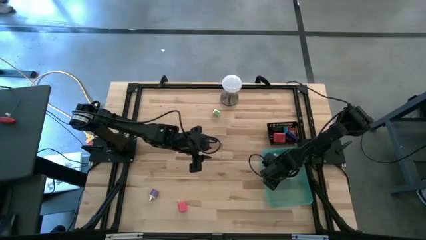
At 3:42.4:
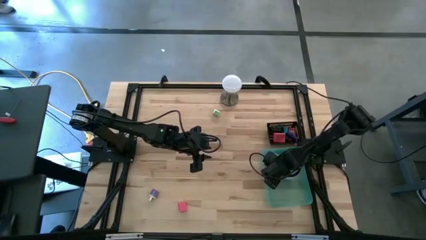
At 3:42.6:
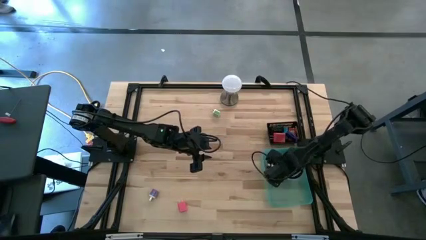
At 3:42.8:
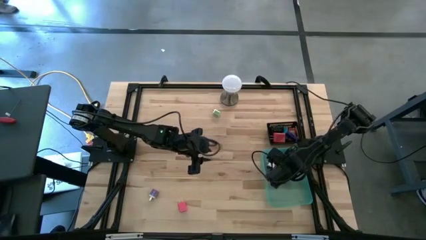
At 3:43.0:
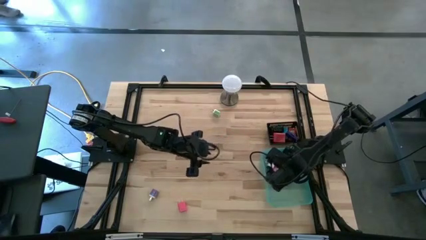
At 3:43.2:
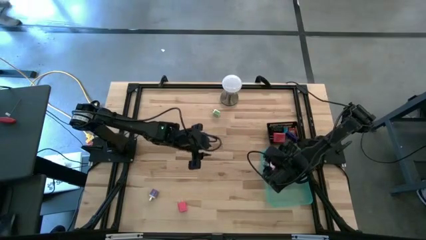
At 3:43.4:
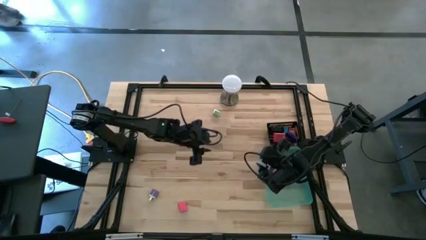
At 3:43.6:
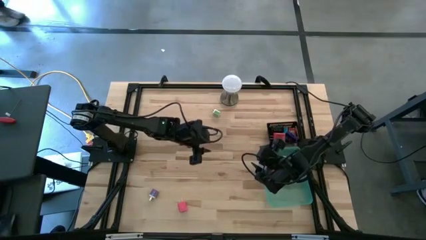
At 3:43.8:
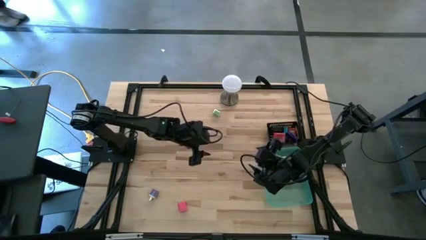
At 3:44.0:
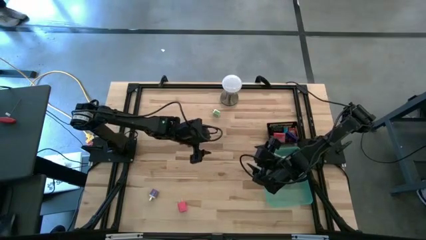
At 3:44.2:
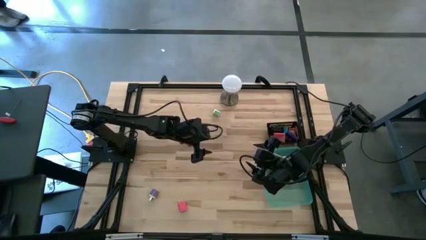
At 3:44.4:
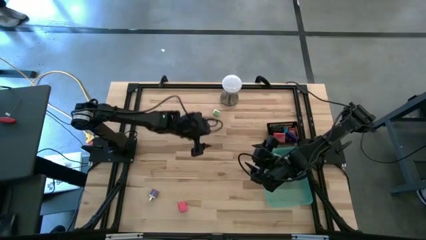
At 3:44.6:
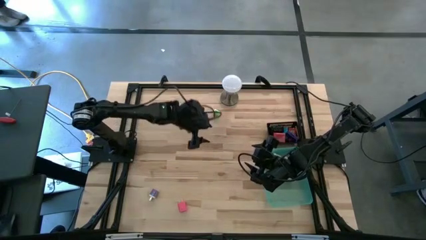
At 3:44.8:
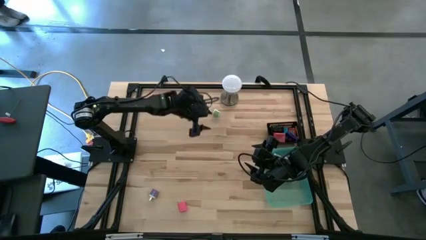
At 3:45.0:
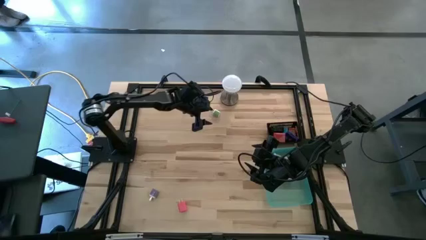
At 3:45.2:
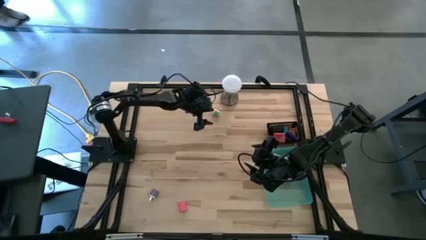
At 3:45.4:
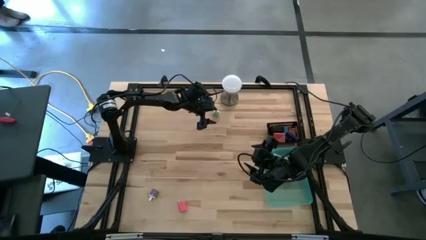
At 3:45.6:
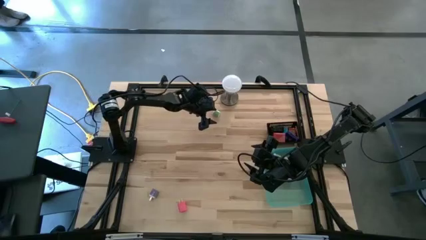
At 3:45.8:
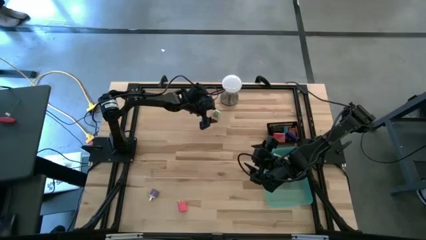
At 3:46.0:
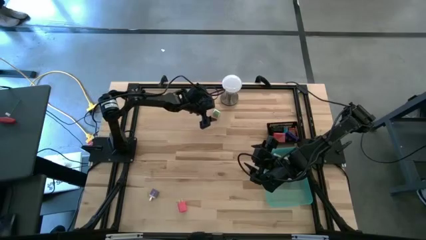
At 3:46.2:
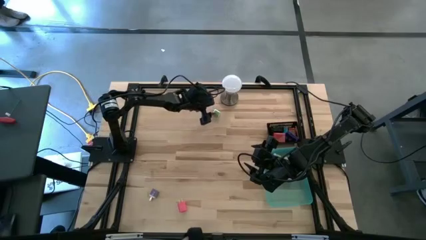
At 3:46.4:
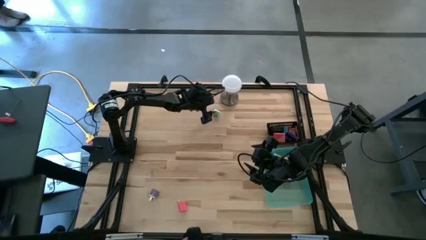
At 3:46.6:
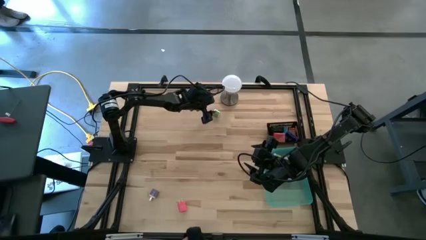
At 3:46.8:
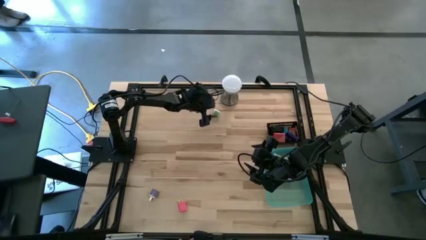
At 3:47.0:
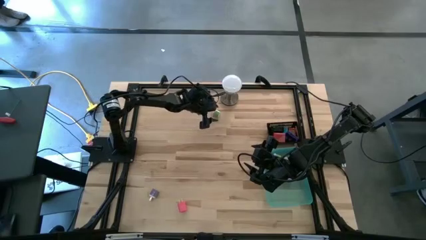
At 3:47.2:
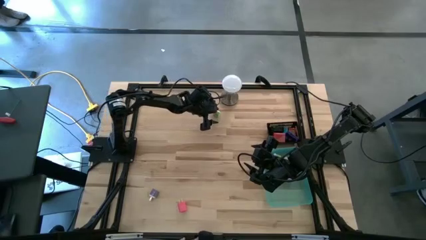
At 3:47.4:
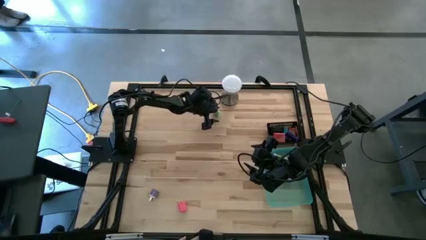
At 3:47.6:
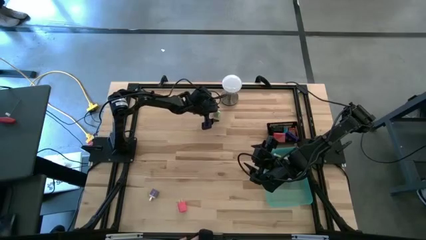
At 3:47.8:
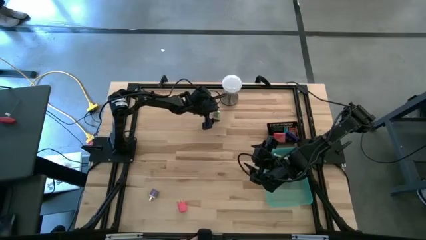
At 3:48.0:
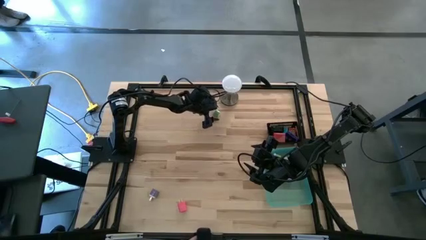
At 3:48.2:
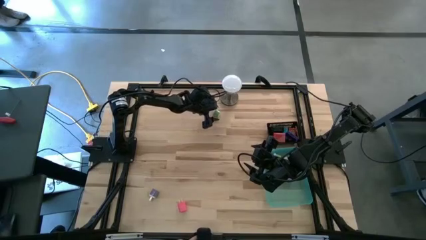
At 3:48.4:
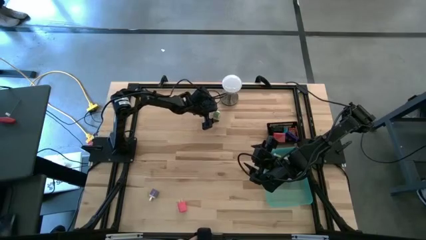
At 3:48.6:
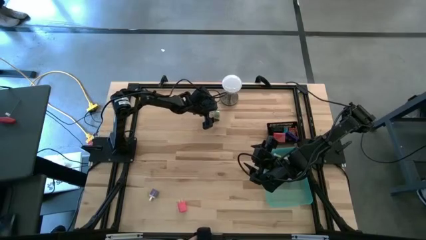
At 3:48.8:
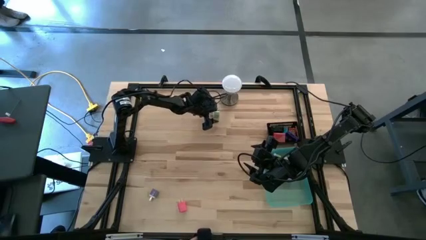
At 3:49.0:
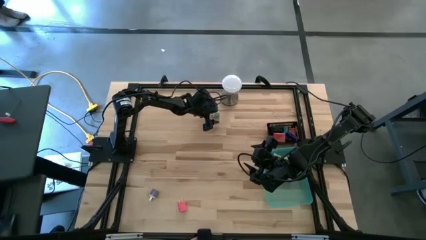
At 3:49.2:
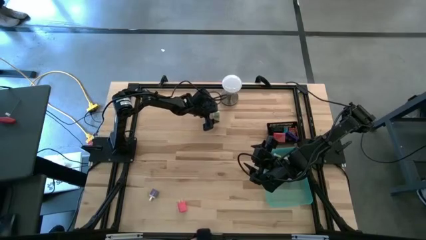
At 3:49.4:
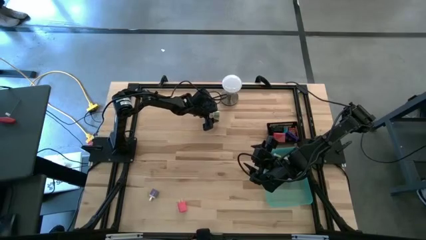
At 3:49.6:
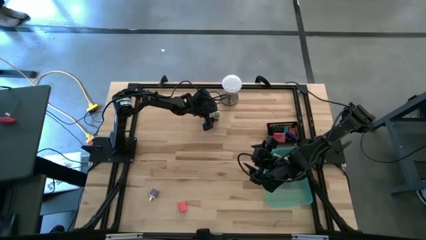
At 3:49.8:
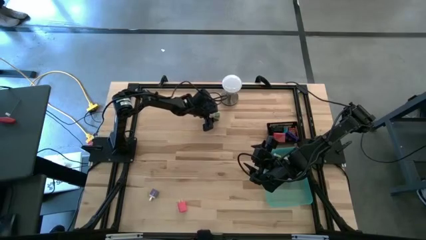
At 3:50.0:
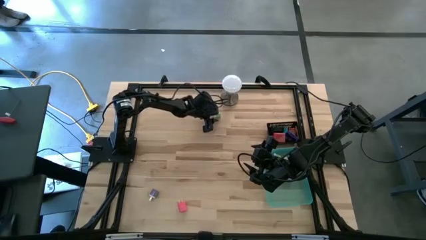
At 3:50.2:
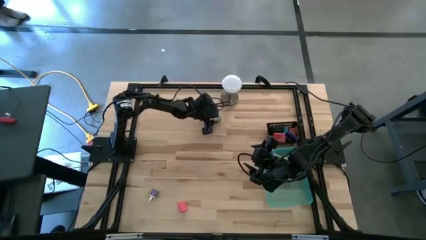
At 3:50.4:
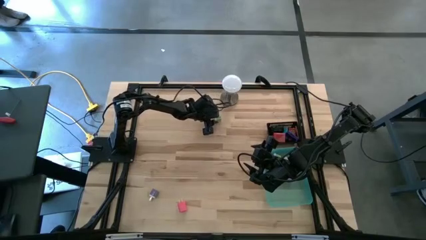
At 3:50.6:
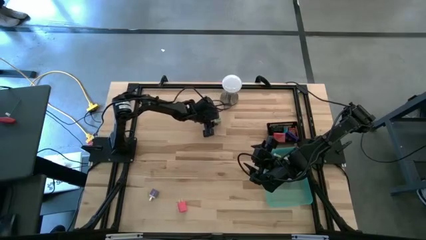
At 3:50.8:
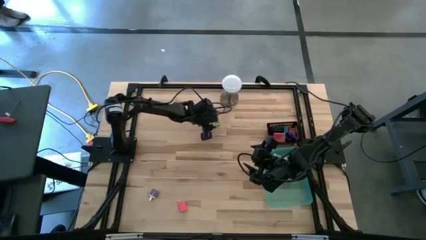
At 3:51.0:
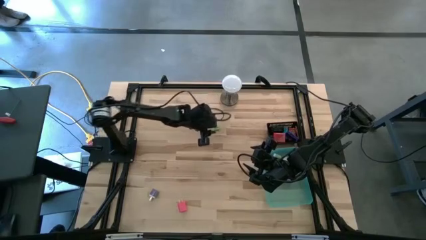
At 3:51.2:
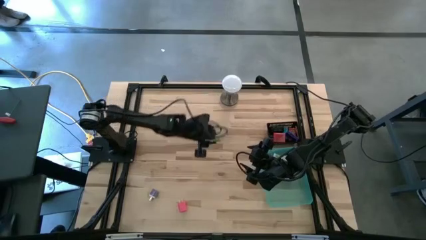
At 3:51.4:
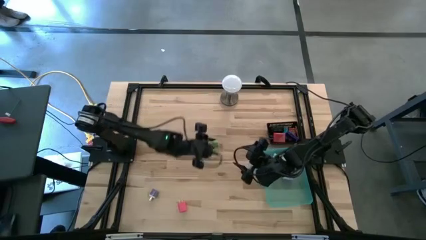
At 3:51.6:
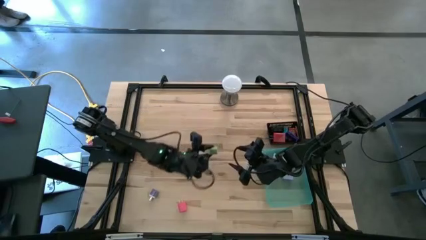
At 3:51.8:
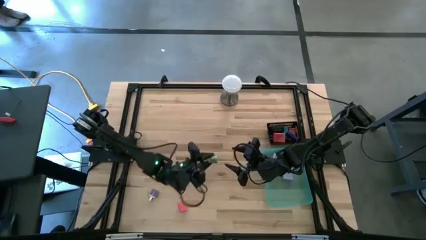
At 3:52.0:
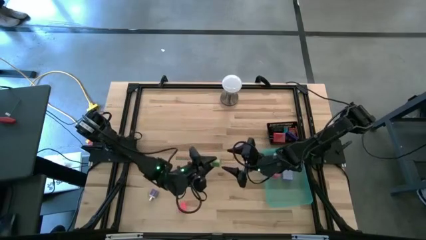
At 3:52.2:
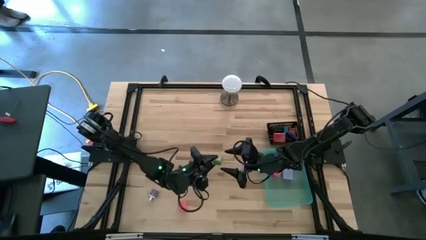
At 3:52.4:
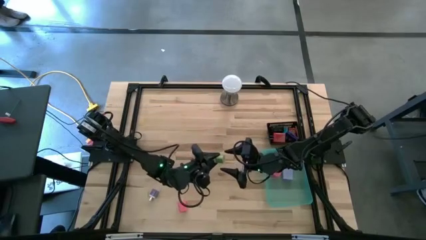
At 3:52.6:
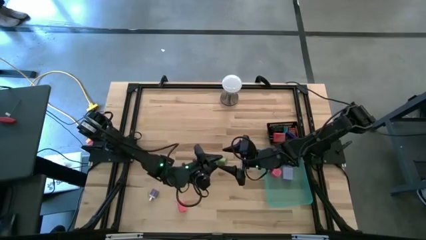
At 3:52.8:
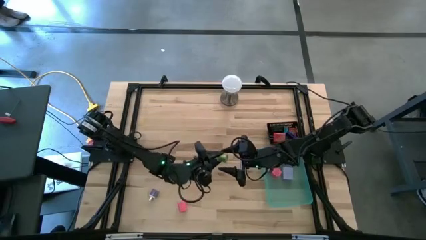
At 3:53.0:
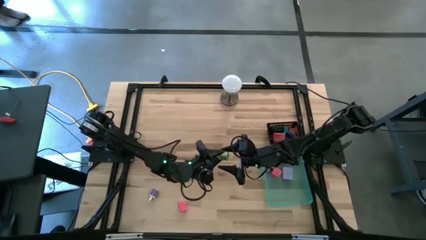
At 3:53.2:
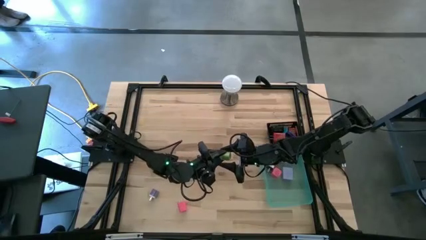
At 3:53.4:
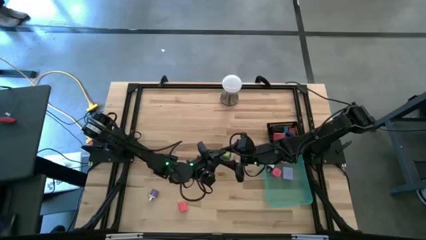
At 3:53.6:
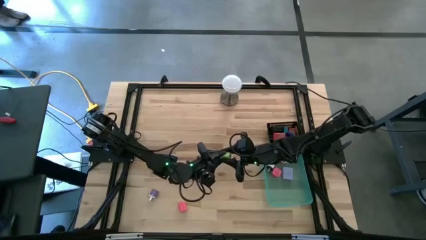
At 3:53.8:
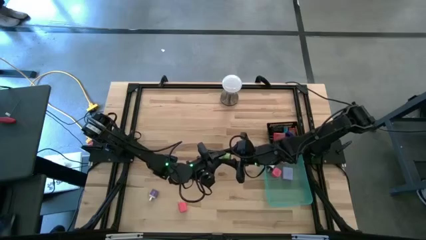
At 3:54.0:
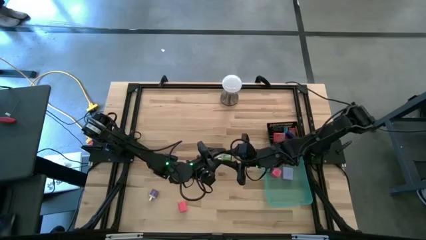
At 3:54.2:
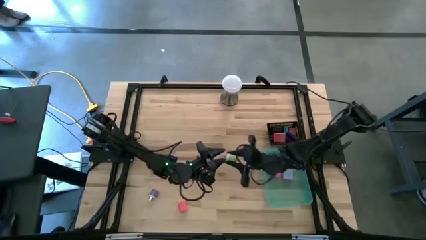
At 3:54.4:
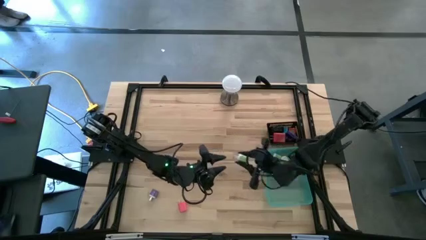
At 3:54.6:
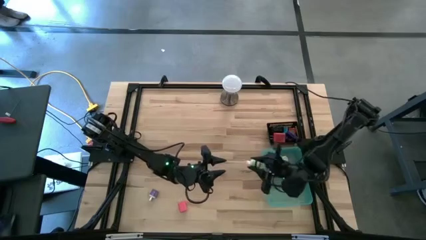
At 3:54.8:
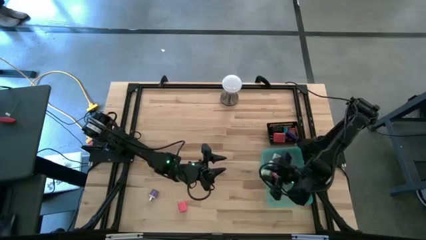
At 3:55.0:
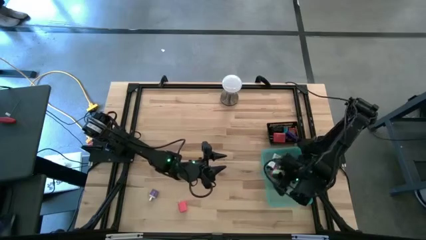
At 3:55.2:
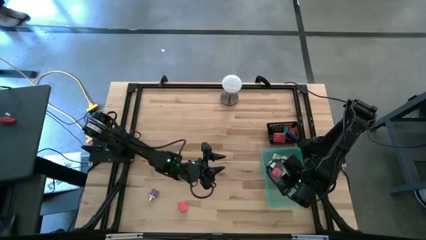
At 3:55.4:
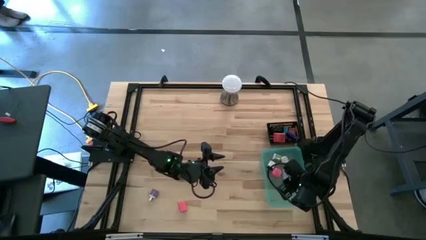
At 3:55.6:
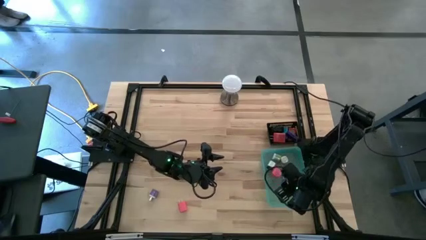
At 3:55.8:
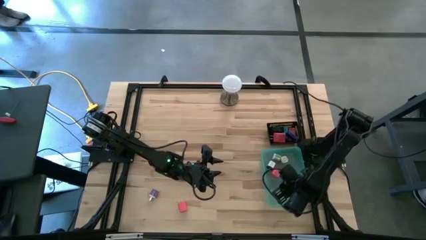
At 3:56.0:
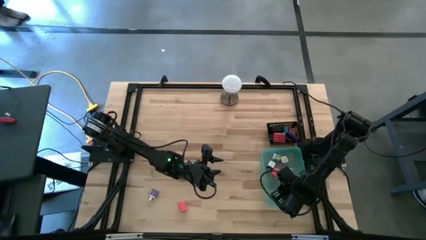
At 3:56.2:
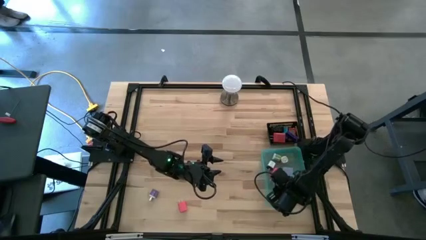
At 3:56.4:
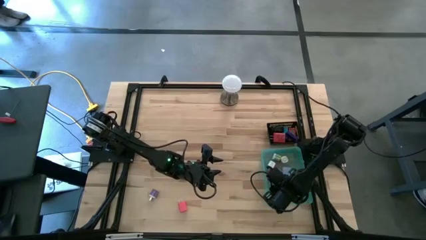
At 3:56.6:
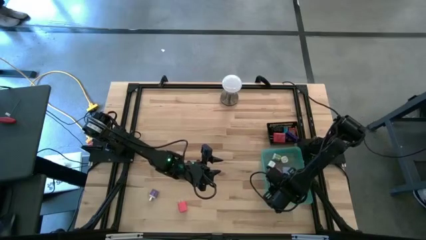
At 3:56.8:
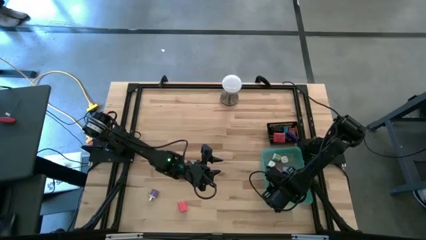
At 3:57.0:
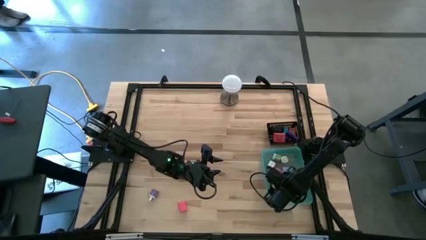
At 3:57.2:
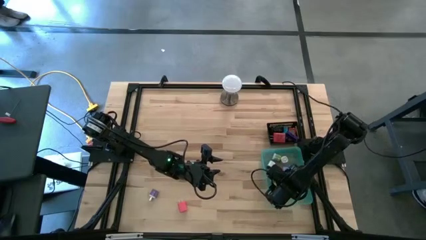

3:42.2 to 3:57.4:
Task: Pick & Place Office items
Put the green charger adapter into the green bin

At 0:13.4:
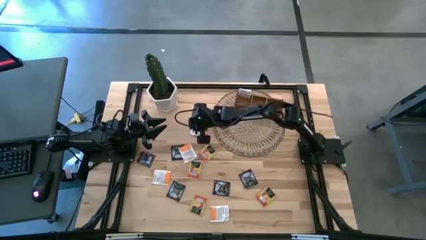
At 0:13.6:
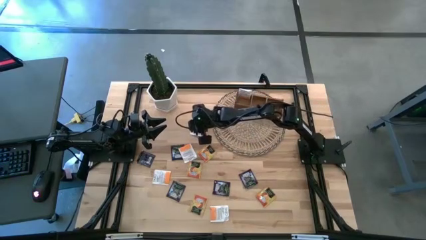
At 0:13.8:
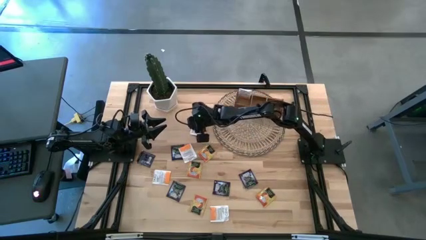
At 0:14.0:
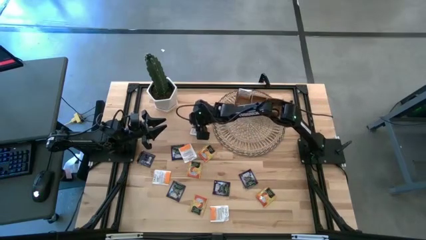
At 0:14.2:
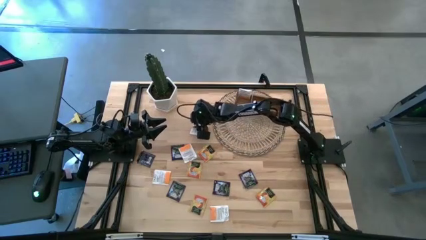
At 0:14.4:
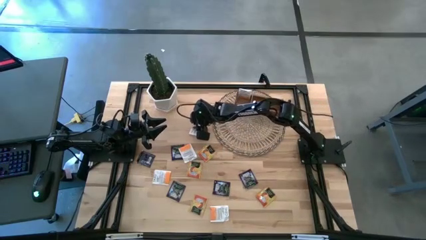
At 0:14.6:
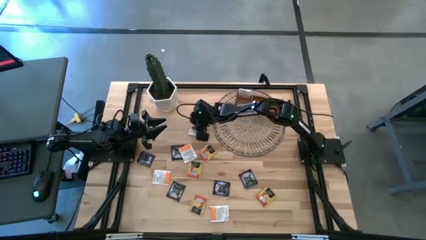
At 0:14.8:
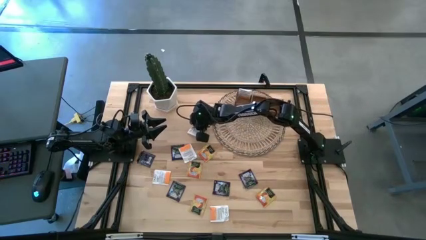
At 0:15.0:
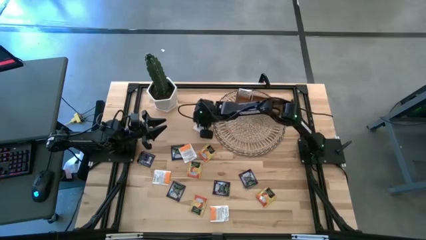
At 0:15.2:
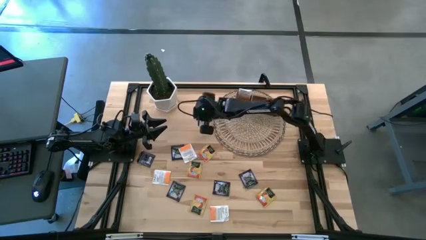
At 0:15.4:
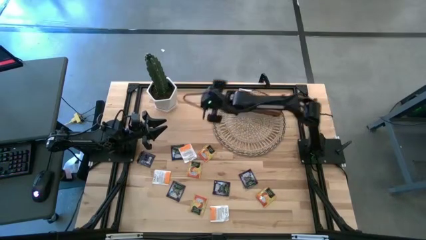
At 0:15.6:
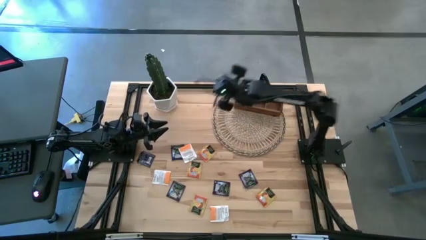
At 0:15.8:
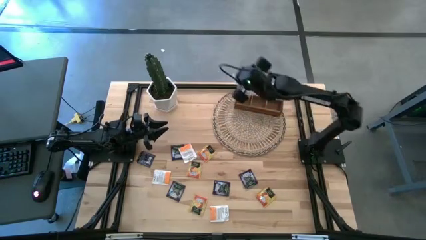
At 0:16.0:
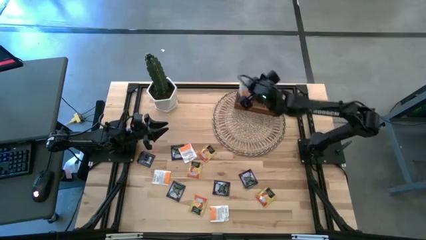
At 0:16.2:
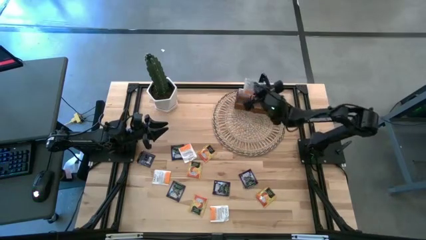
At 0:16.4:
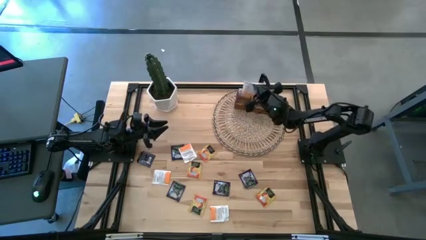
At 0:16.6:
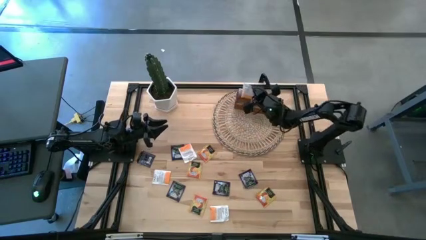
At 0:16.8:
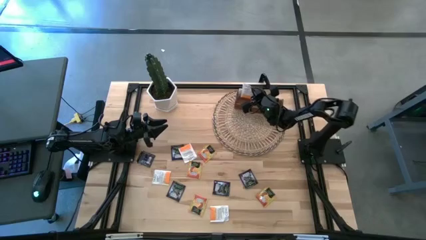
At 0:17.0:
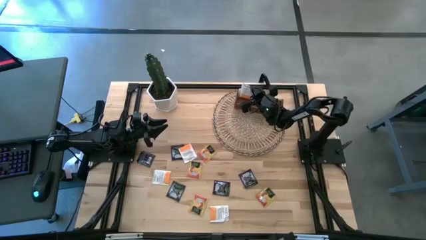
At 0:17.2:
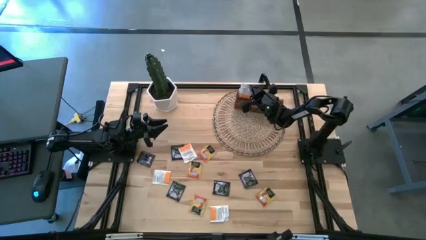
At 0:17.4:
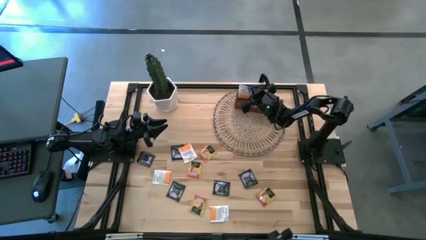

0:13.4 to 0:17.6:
Task: Pick & Place Tea
Put the orange tea bag into the left section of the wooden organizer
